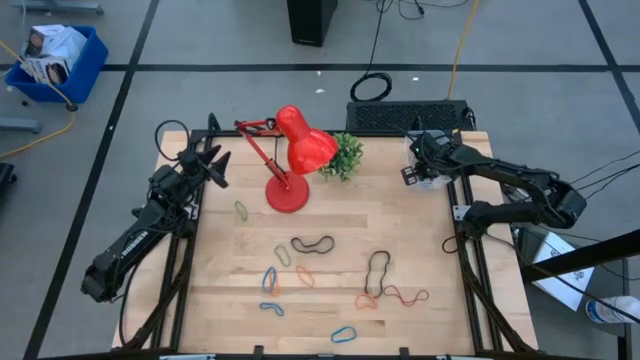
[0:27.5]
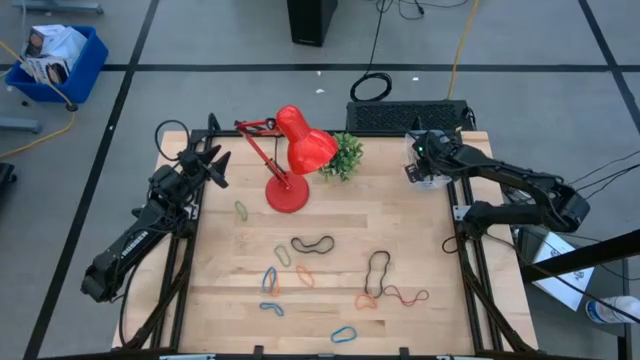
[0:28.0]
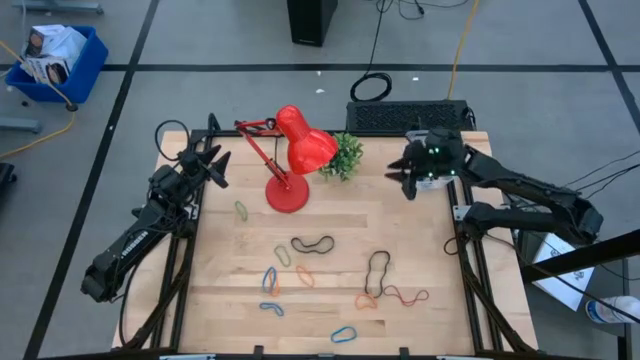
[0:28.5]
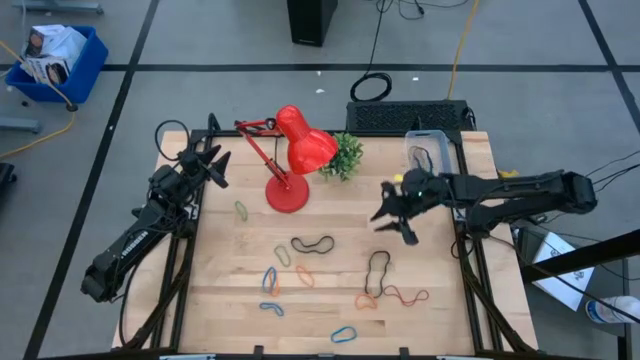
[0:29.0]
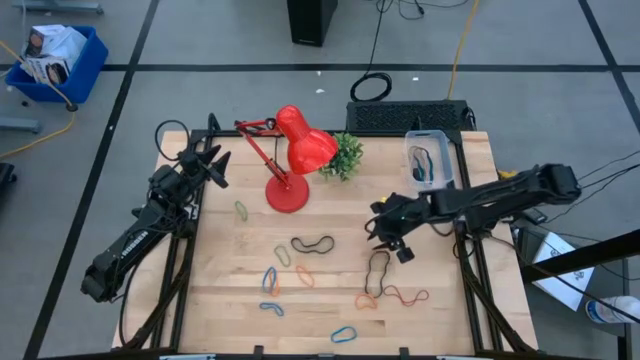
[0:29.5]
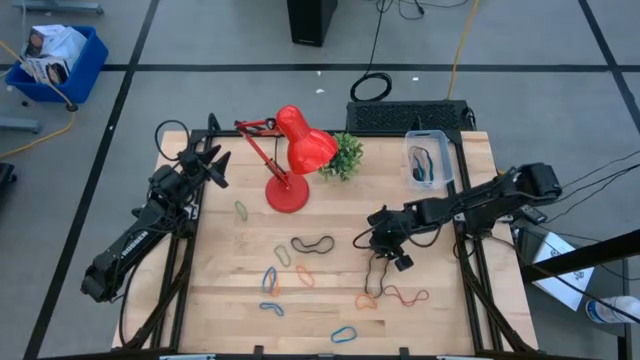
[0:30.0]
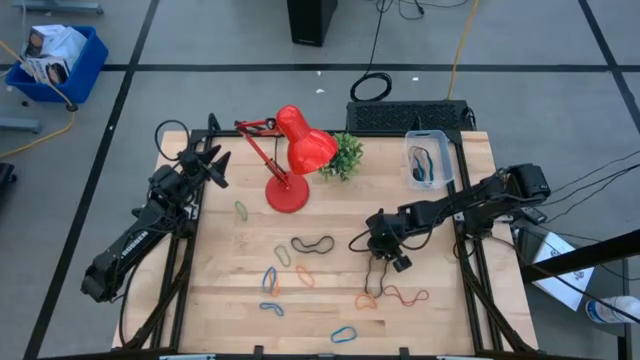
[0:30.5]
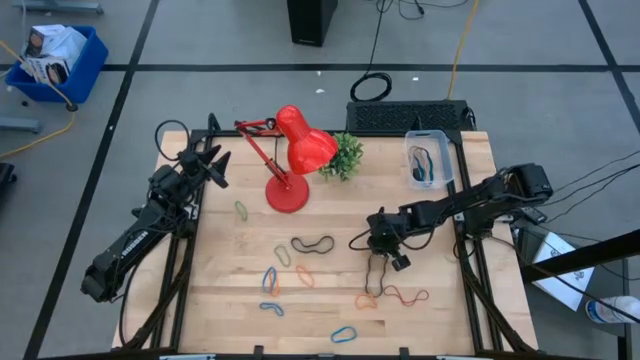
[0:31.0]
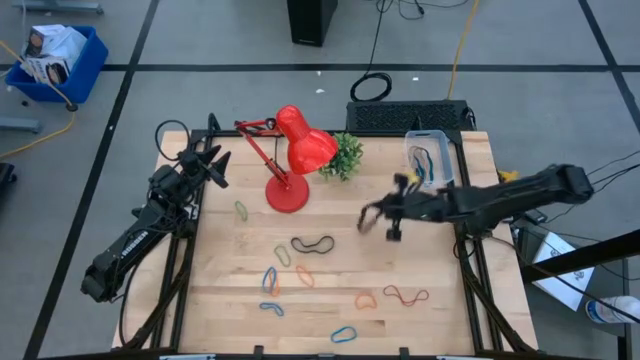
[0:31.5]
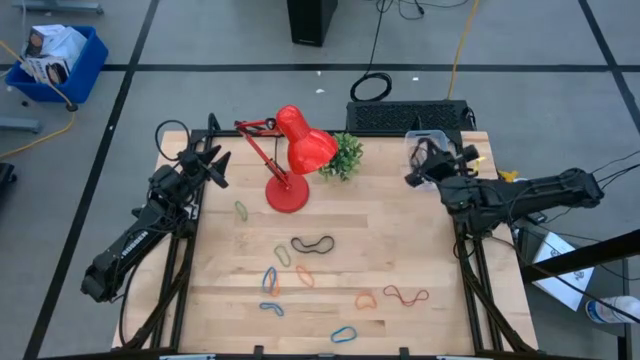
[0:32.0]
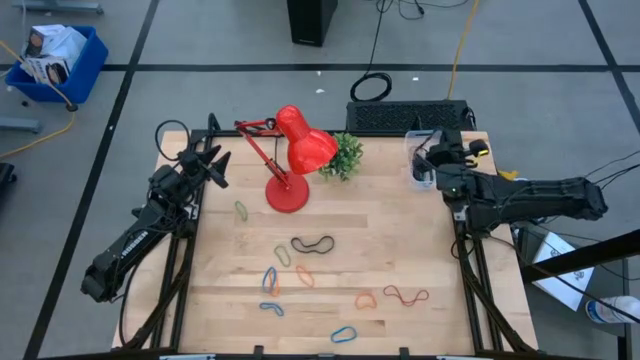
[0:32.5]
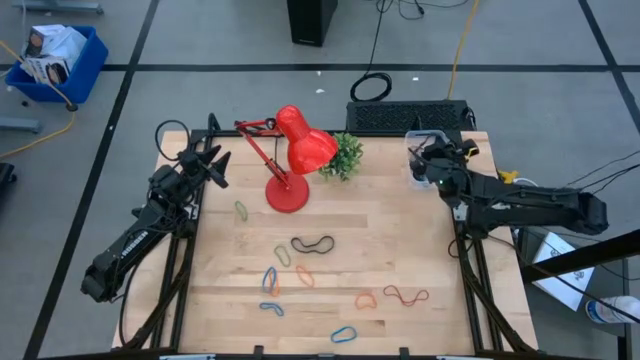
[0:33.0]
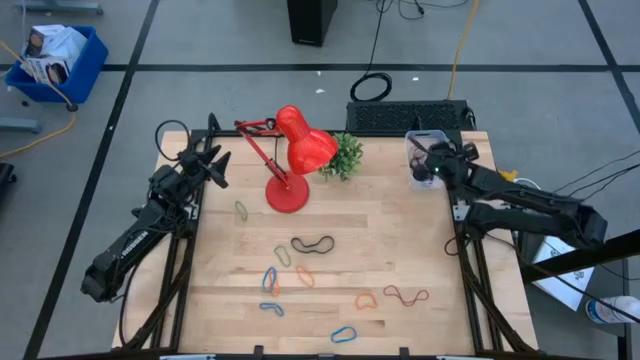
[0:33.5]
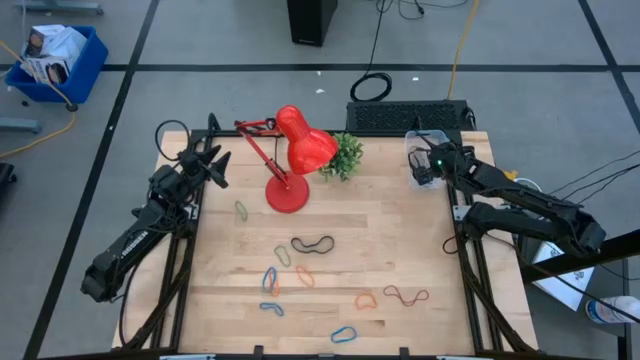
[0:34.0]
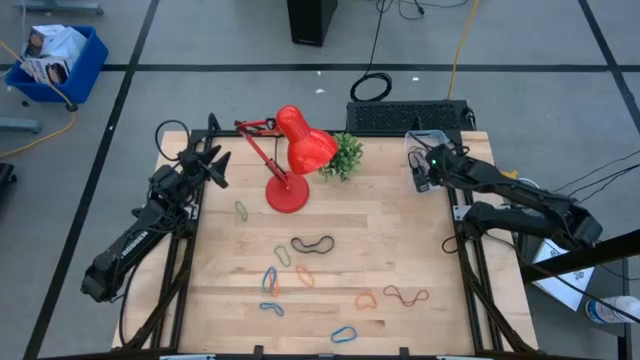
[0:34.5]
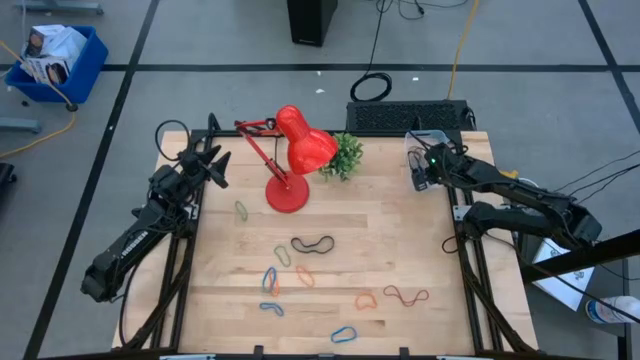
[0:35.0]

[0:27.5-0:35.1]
Task: Pick and place rubber bands into bin
Put the bottom black rubber band into the transparent bin

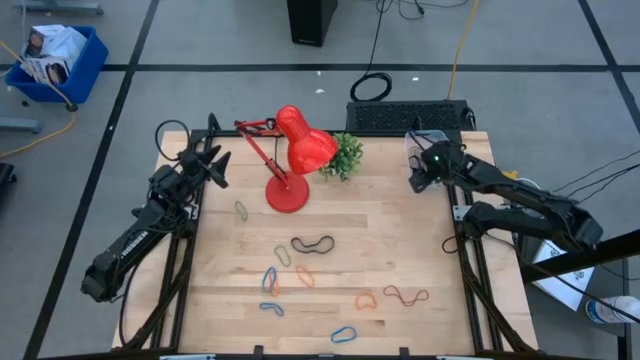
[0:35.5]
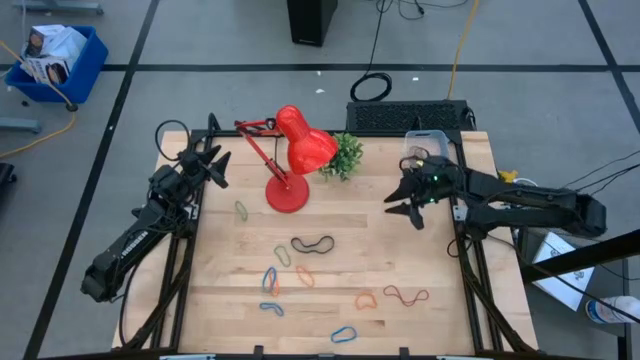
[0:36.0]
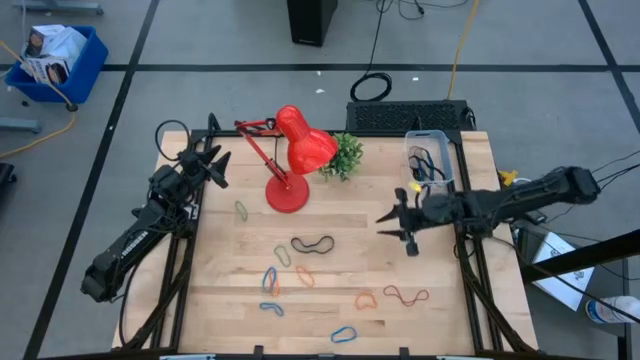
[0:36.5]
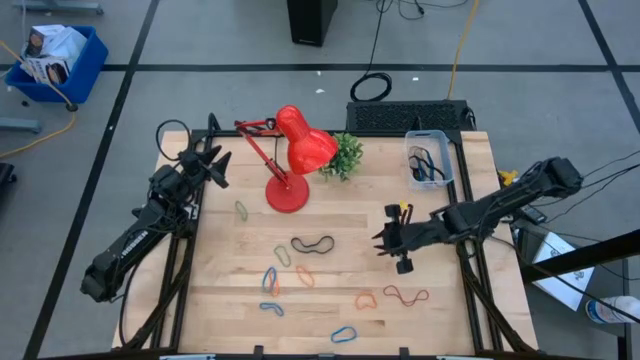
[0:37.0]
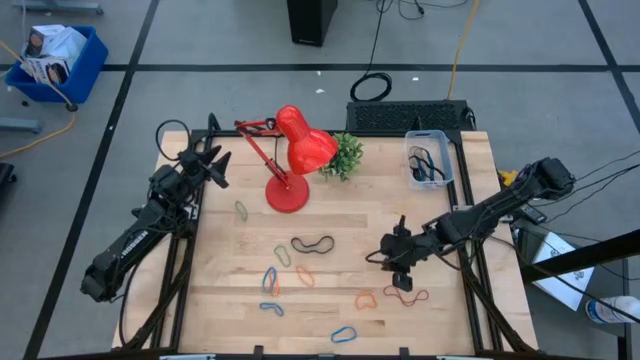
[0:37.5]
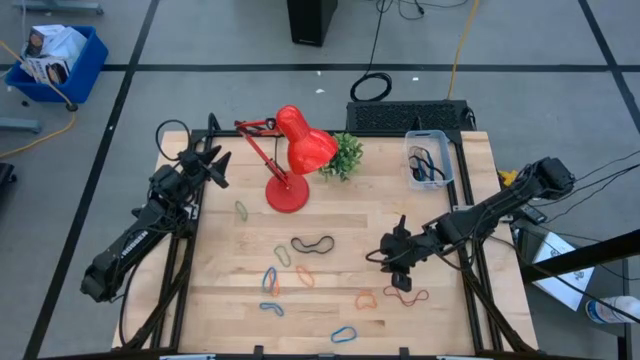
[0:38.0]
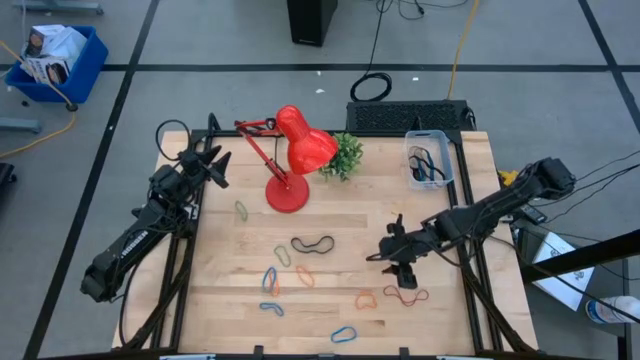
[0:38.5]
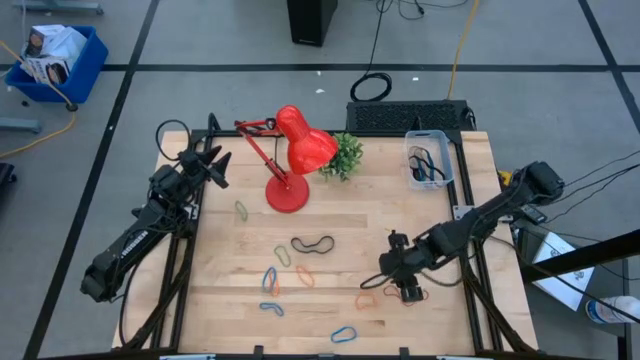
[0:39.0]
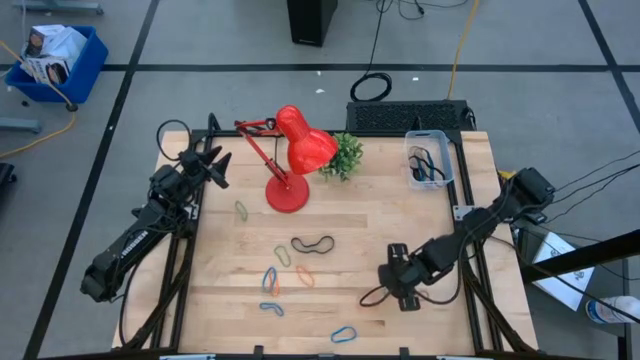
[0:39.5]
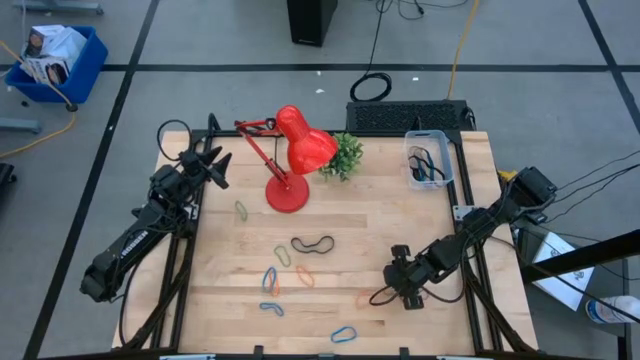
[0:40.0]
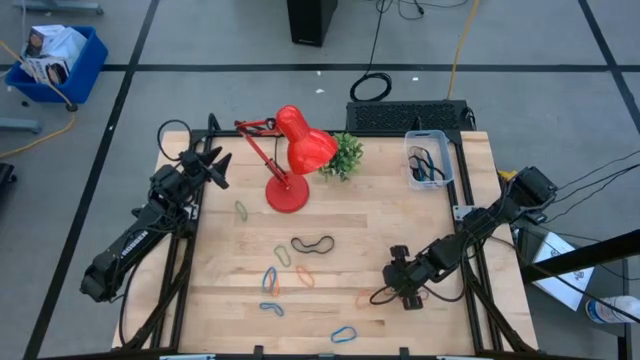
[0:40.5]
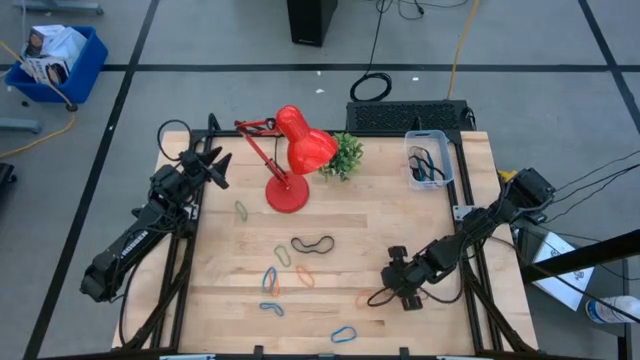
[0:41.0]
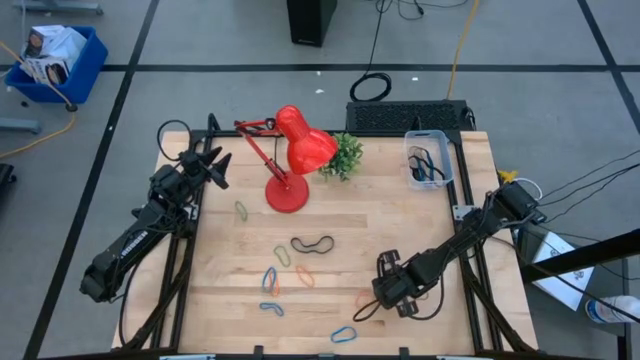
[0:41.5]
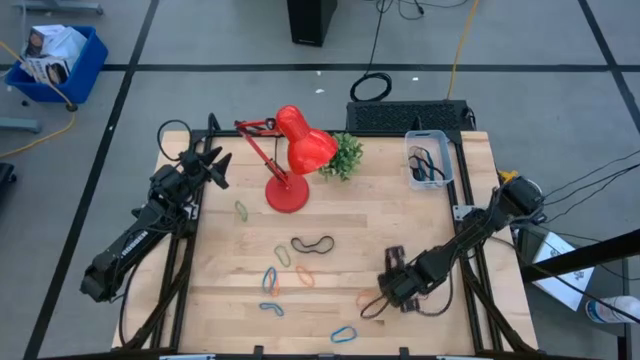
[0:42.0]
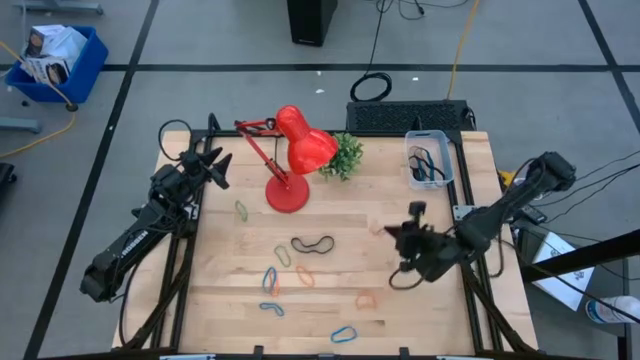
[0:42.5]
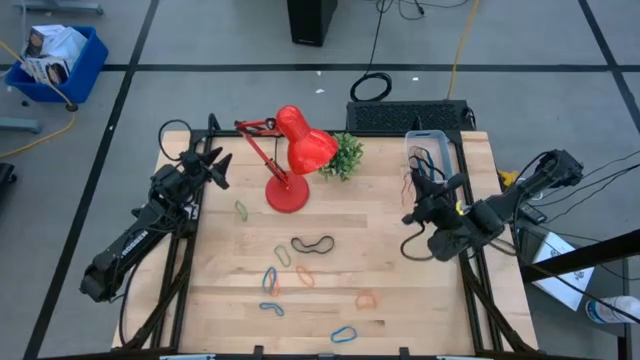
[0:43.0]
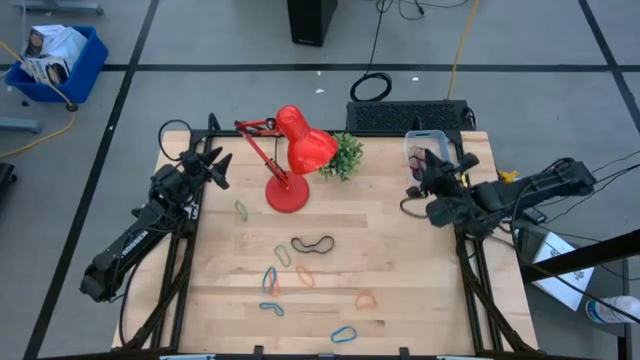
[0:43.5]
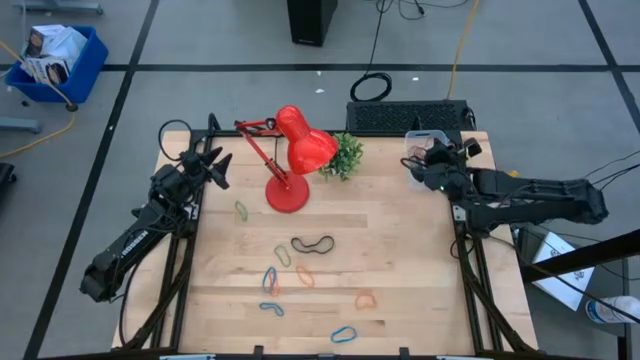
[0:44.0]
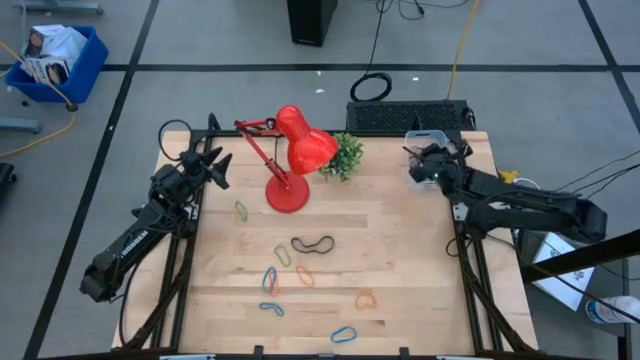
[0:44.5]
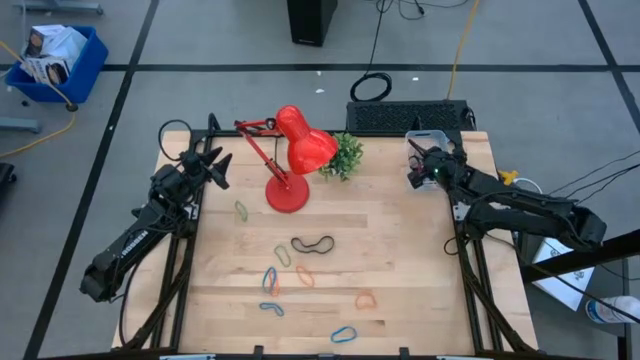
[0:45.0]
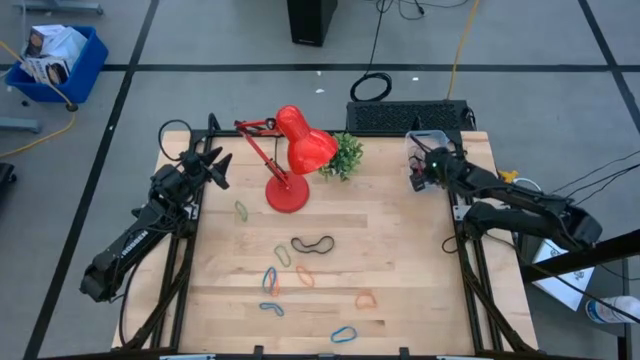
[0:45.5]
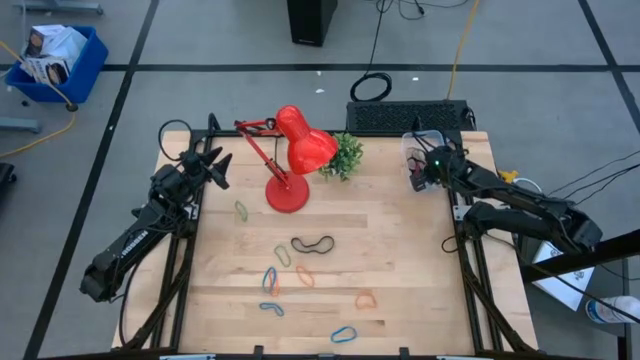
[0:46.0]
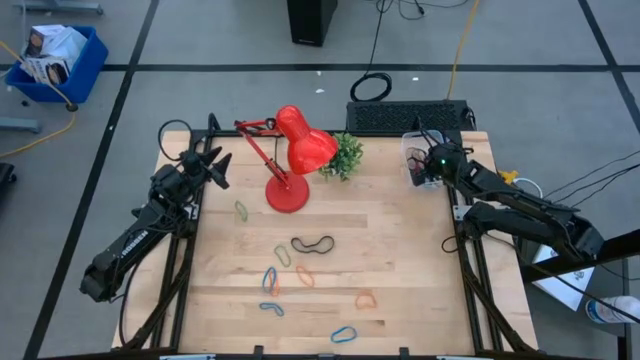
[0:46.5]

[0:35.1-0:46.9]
Put the red rubber band into the transparent bin

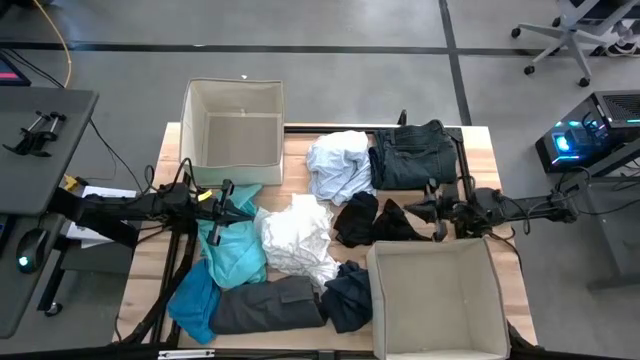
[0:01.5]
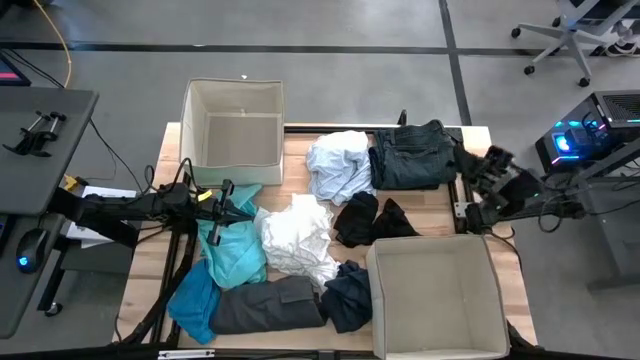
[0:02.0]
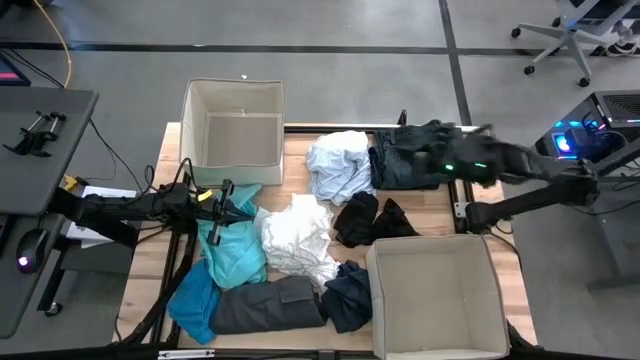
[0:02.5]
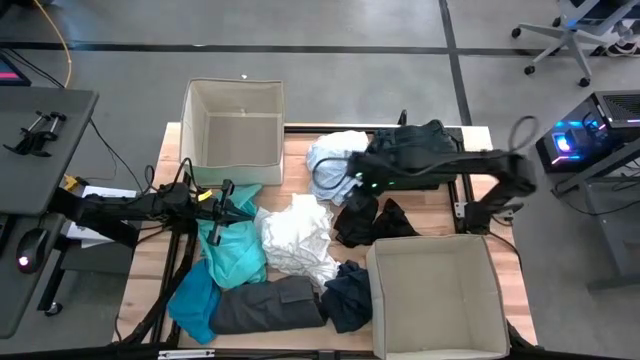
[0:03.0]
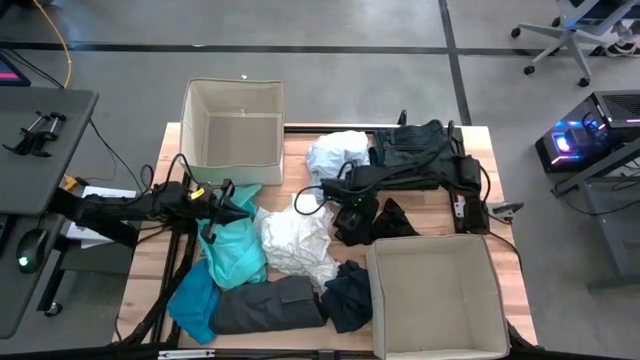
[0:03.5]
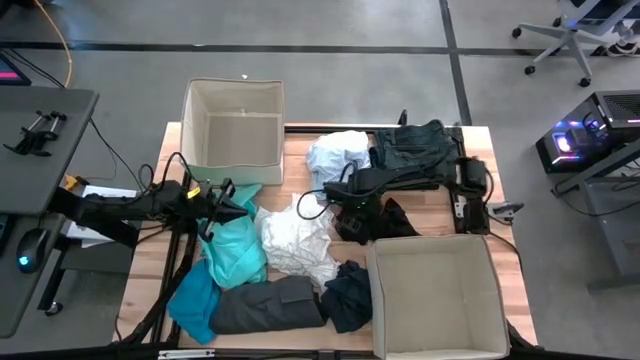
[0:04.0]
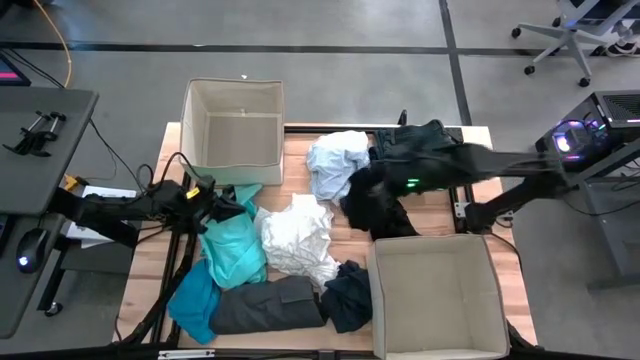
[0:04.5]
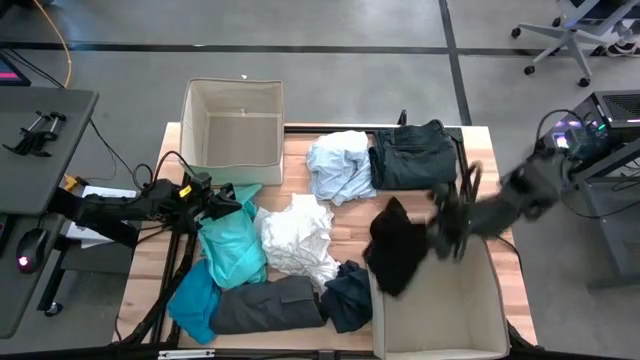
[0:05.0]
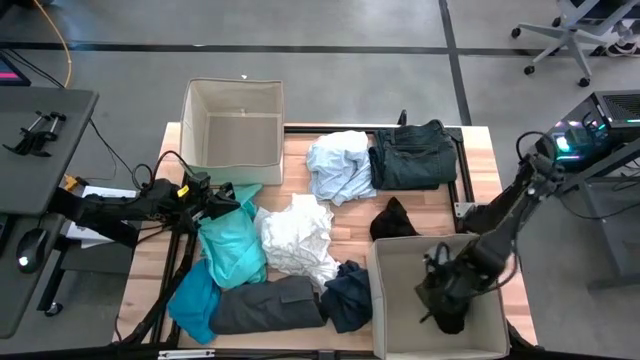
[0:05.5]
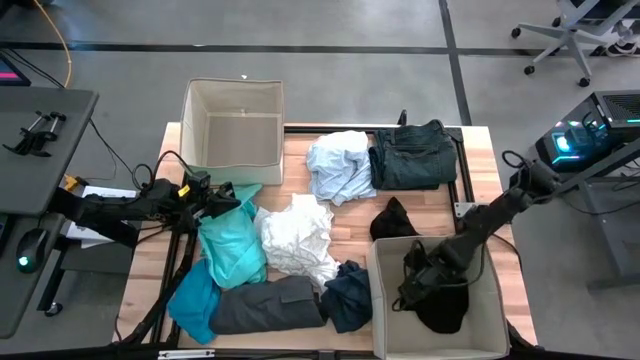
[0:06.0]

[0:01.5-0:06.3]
Task: Sort clothes
Put the black boxer into the bottom laundry organizer
